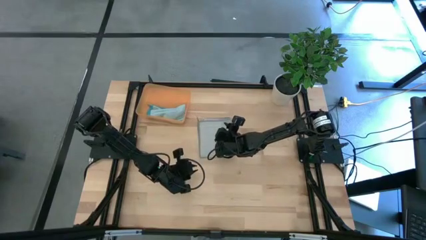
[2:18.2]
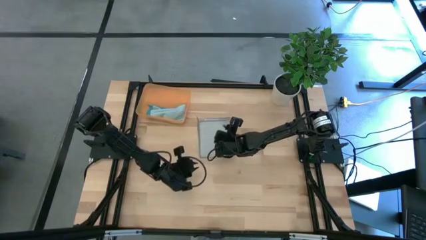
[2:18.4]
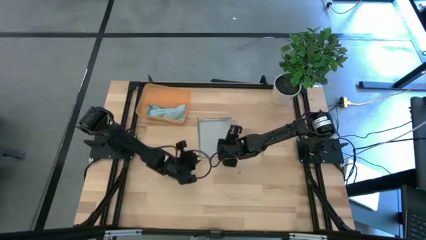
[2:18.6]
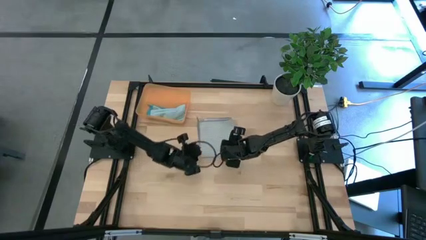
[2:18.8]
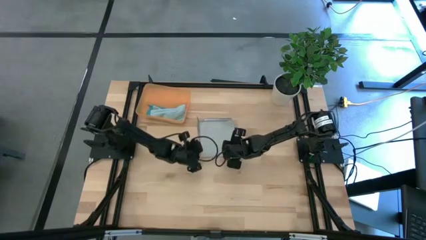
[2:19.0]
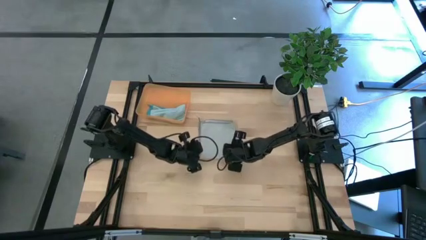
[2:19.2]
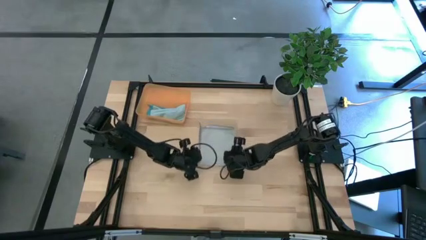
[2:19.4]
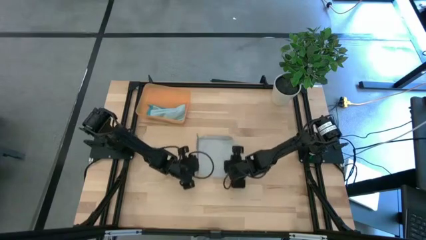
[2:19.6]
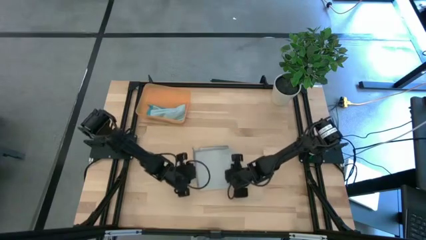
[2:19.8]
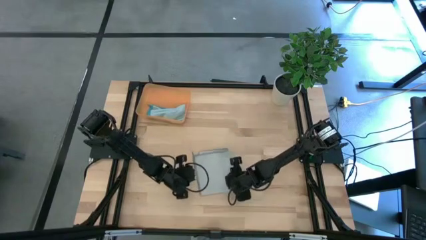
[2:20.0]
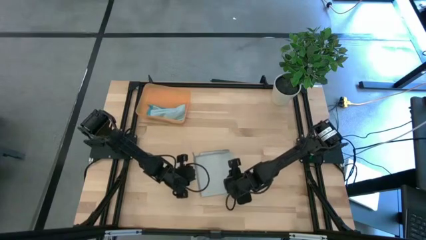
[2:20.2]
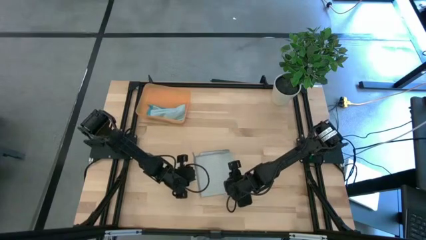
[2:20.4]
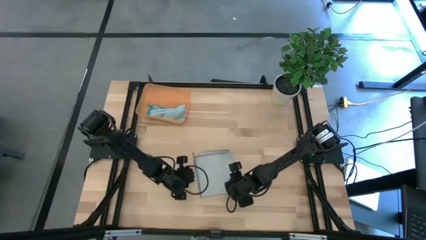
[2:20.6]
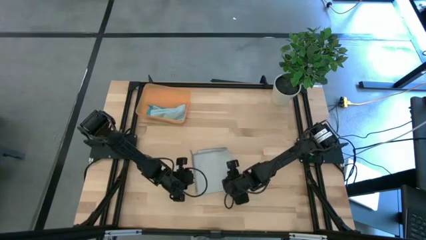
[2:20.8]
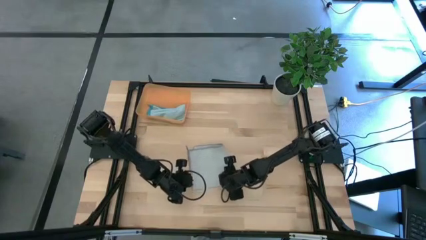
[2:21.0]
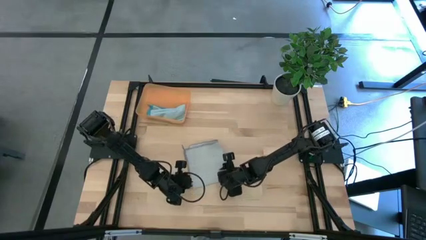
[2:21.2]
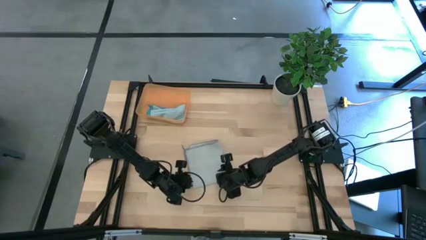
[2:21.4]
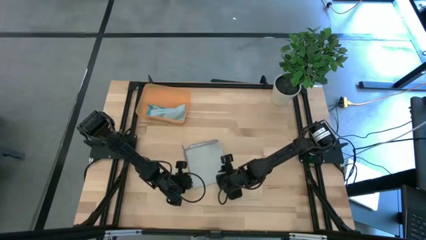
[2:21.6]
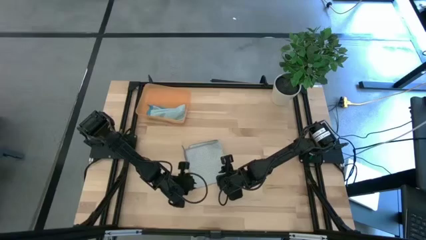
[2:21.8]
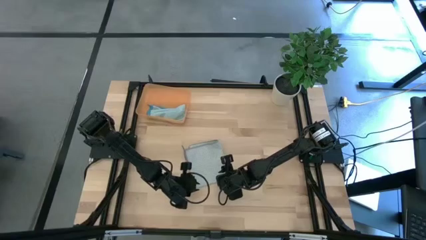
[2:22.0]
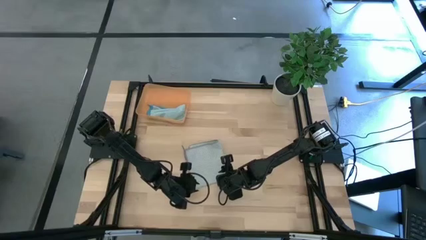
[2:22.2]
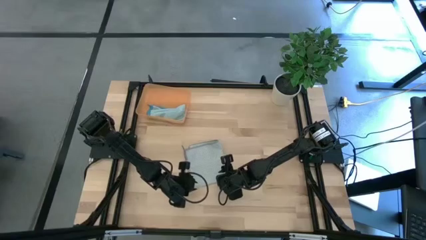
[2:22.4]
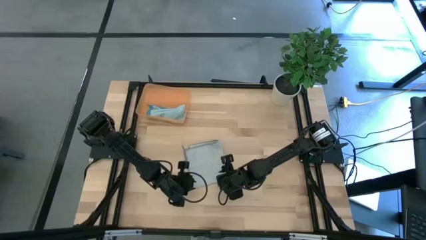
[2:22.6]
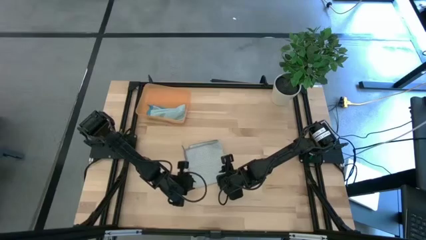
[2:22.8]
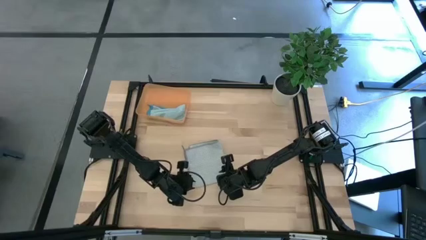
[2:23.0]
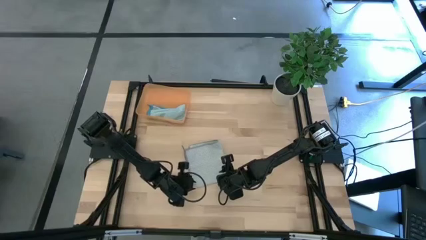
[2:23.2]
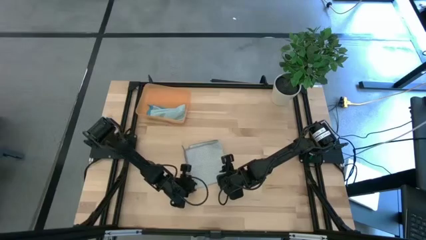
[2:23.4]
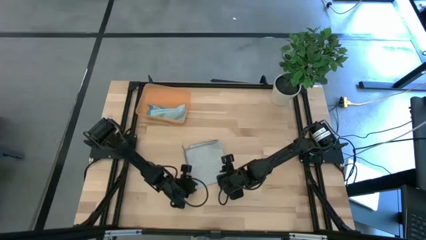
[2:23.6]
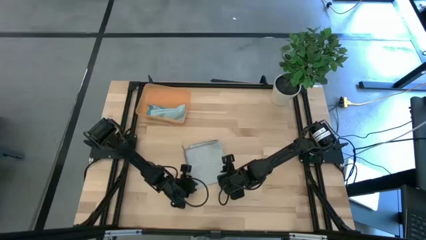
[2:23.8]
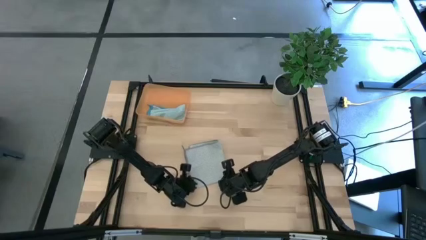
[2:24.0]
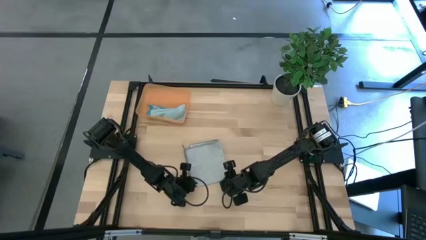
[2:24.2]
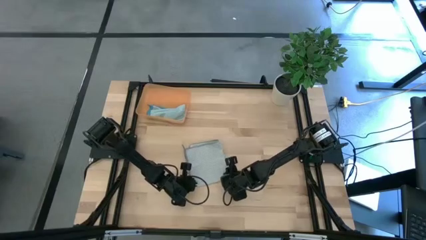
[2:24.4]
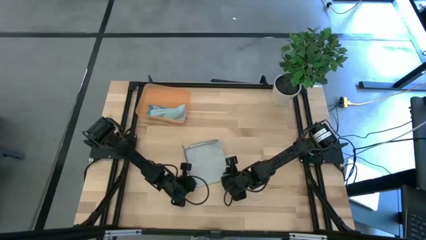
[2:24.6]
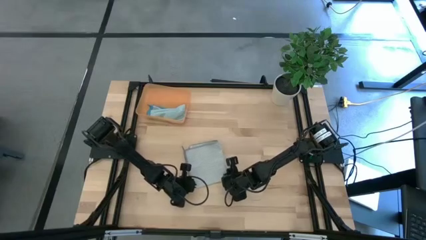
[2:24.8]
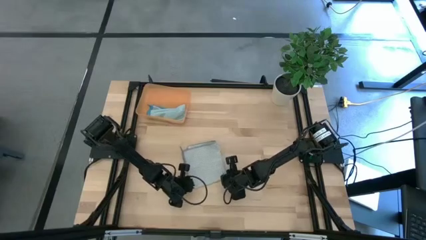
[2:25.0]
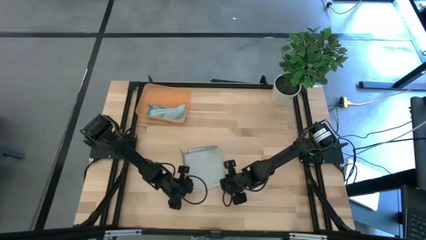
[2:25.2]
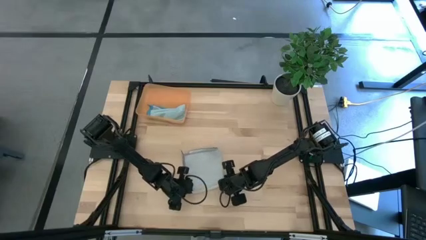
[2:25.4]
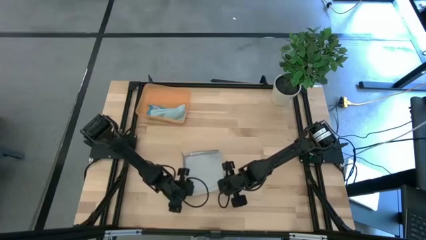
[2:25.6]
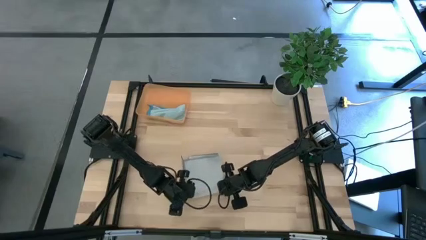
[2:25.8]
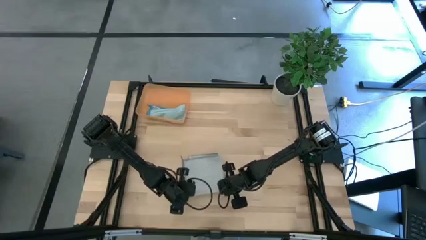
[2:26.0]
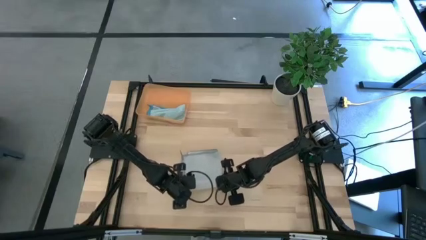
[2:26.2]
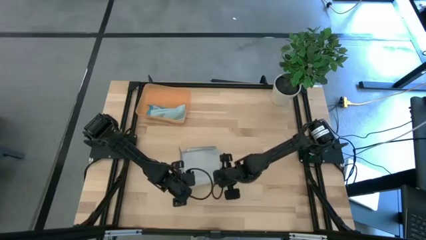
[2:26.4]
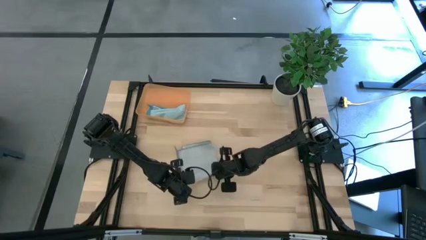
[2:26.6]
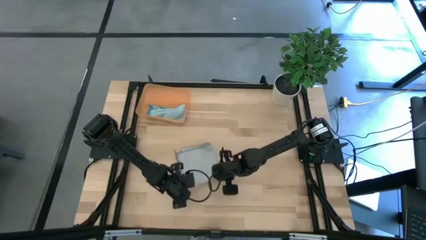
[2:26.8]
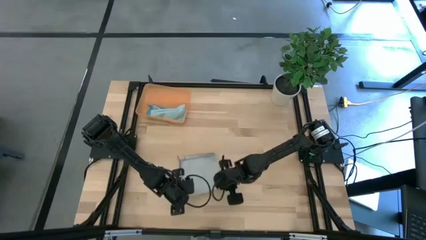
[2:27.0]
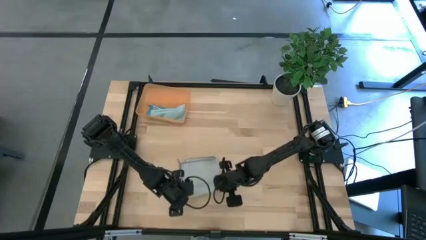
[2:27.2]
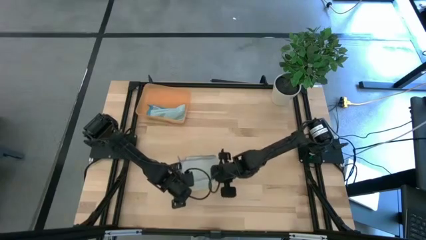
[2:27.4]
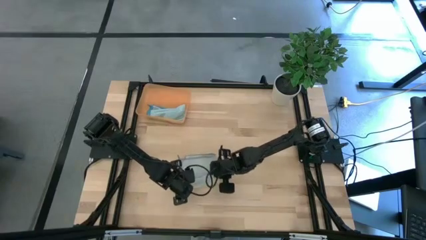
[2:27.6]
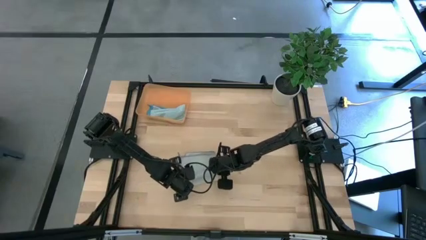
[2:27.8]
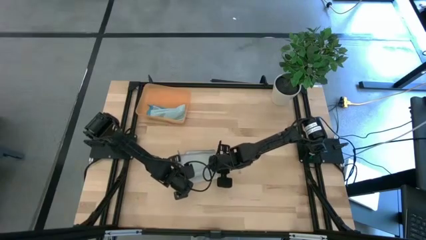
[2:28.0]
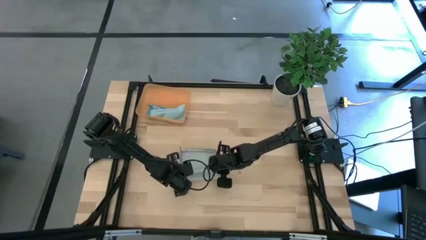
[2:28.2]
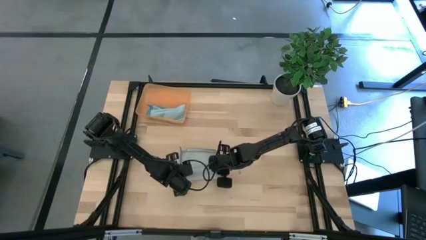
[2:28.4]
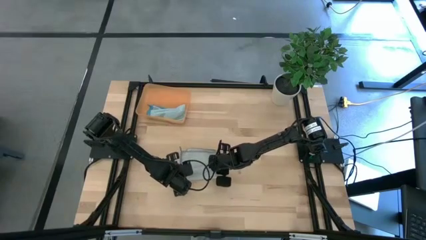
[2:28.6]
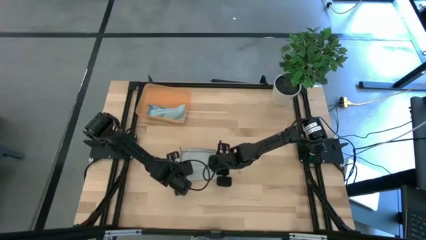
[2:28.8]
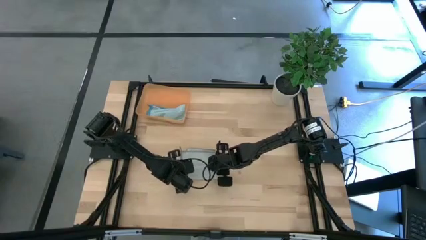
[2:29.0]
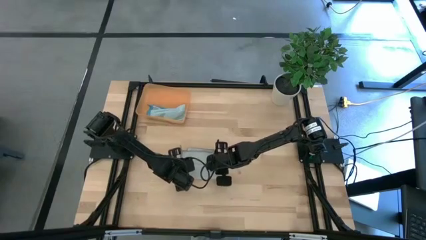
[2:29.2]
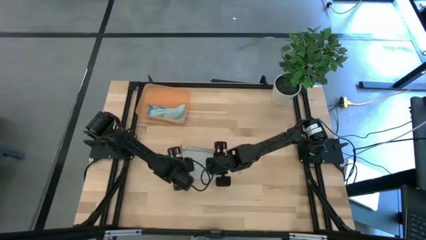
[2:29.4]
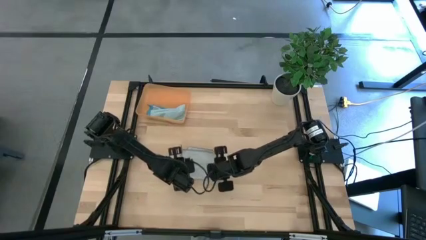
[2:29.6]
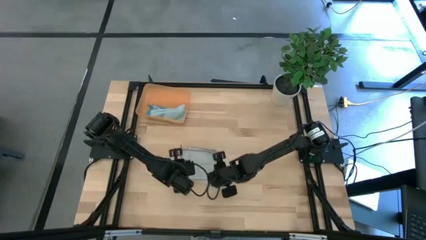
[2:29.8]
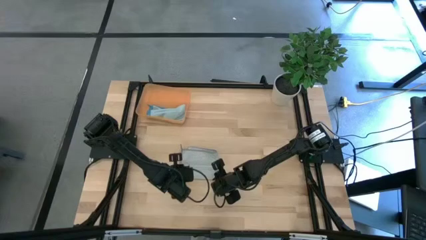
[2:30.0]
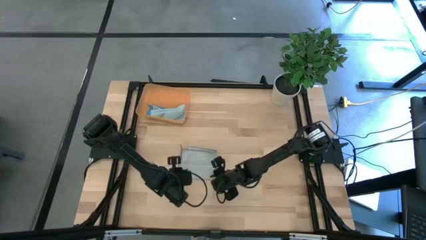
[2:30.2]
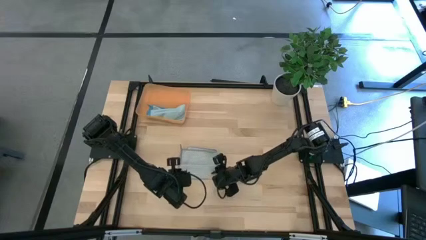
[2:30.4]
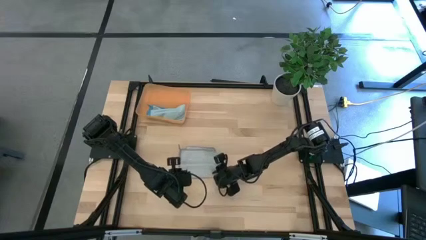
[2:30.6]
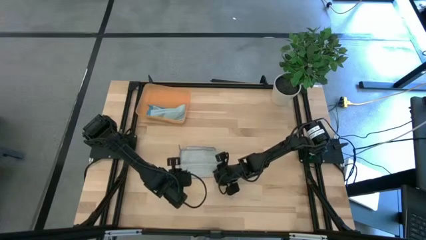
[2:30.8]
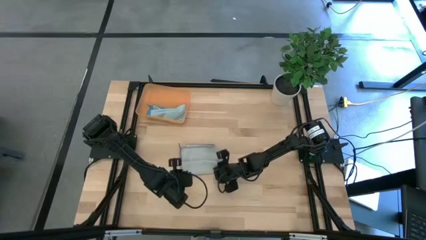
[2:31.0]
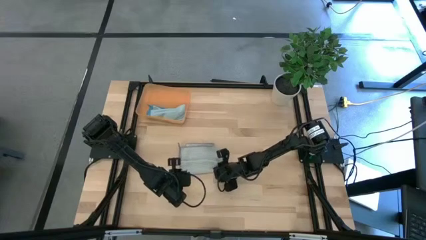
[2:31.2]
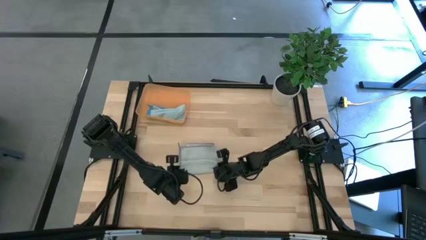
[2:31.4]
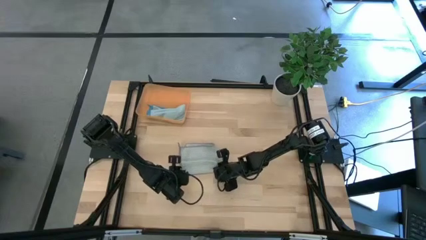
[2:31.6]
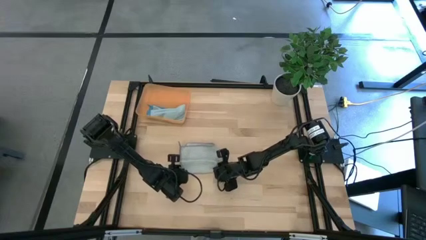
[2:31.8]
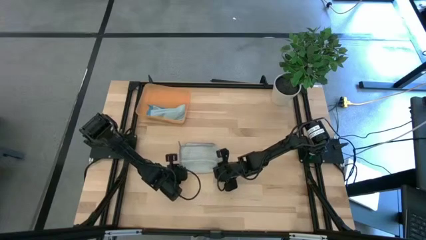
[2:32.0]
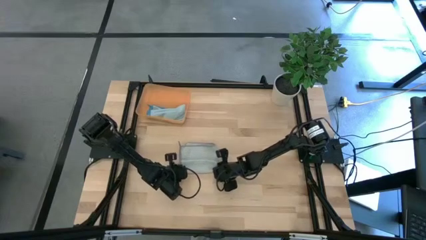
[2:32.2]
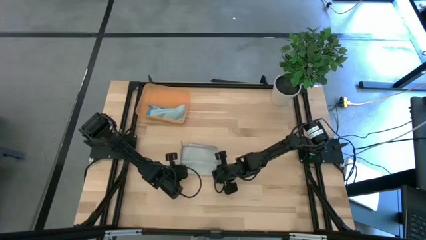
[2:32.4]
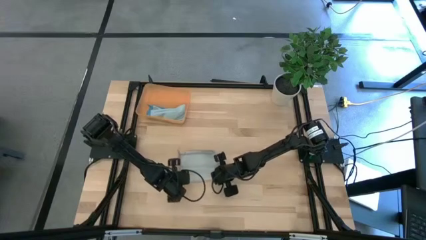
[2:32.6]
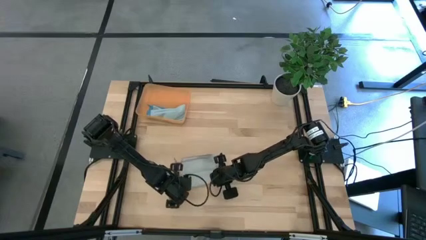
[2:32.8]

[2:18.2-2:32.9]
Task: Roll microfiber towels into tight, uniform cylinder then place into a basket
Roll the gray microfiber cloth
